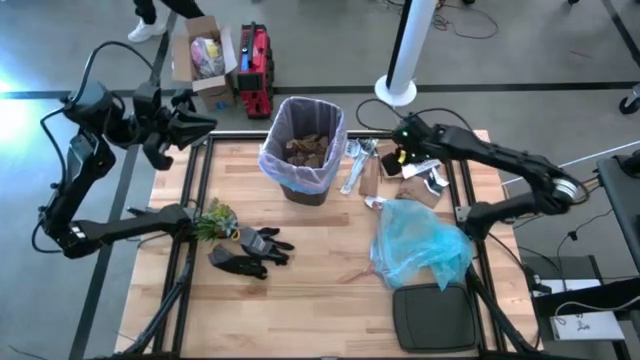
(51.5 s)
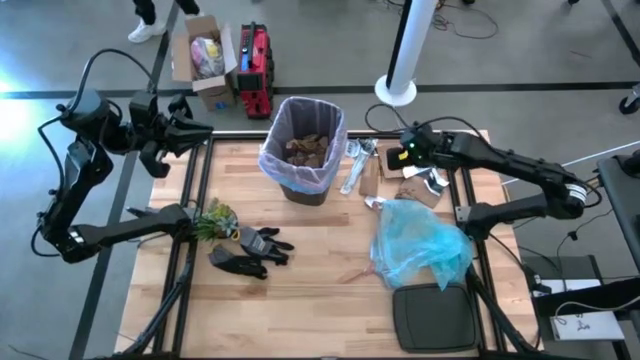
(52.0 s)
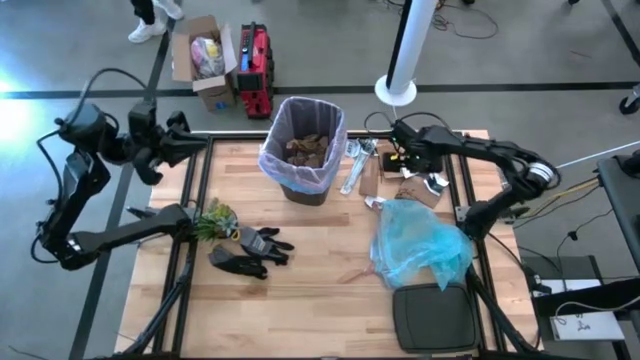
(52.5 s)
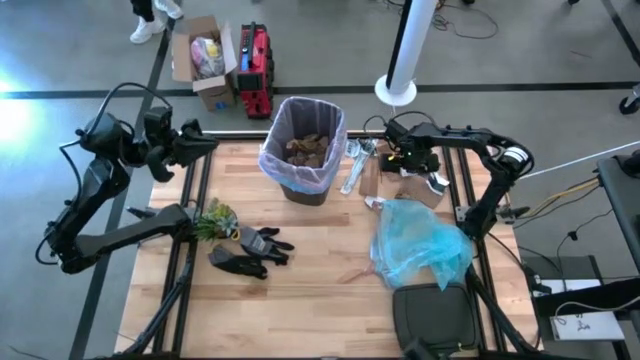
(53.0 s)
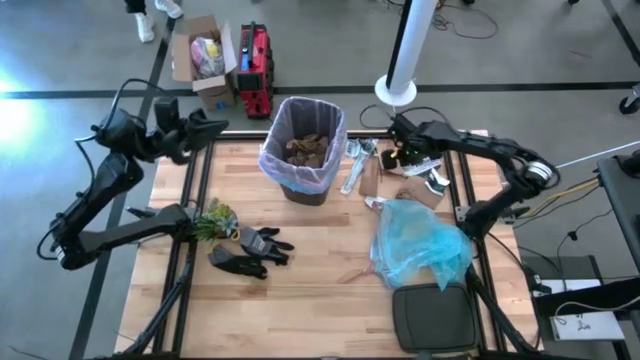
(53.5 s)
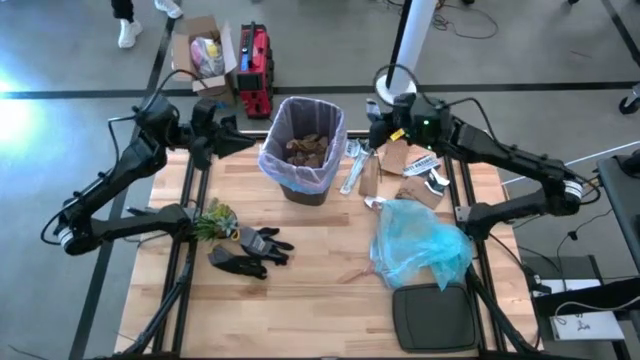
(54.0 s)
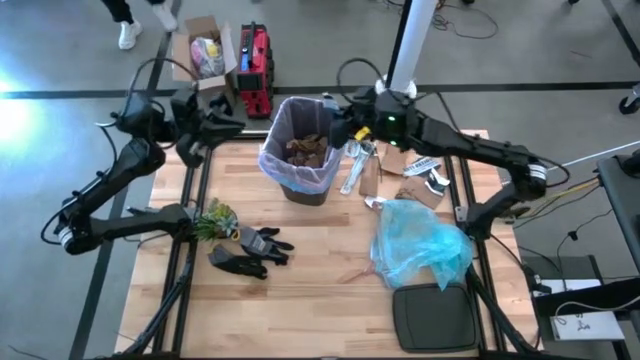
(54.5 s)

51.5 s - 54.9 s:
Task: place trash/remove bag and relplace
Put the white paper into the trash bin

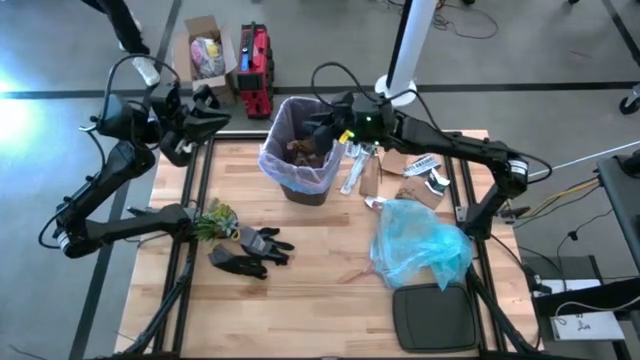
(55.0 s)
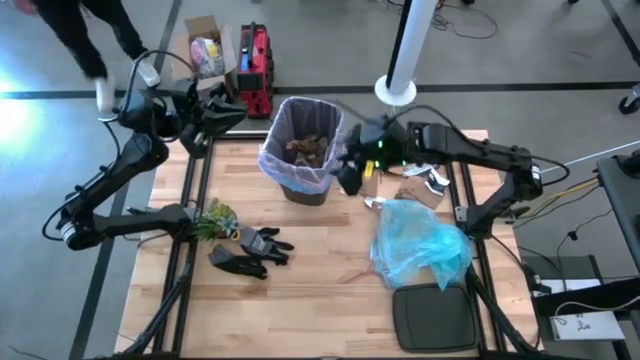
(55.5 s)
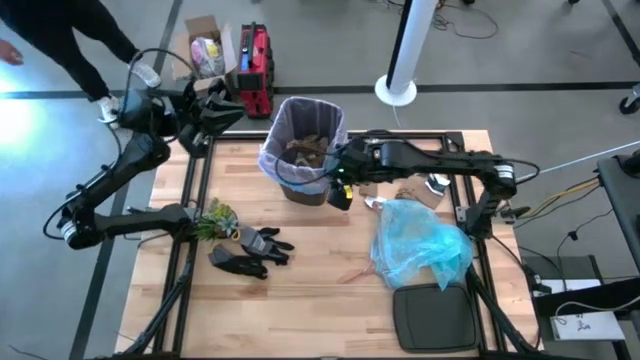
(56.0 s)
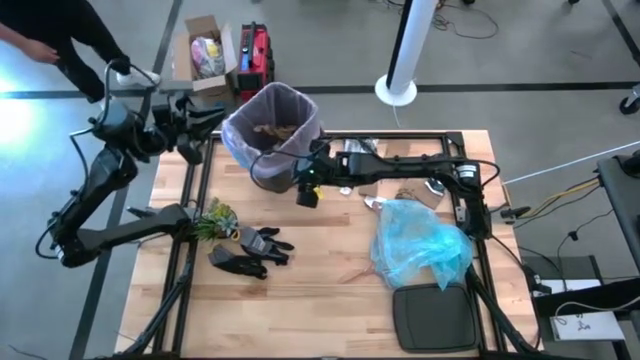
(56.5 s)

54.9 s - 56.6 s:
Adjust the trash bin

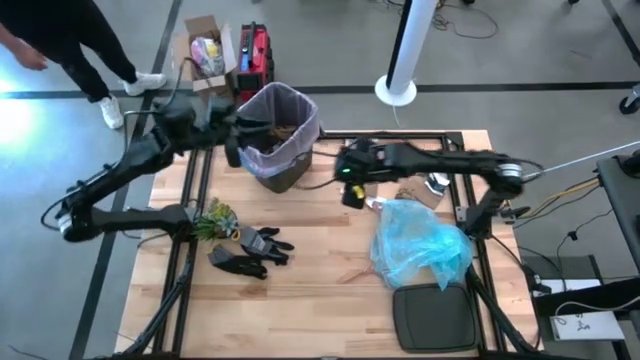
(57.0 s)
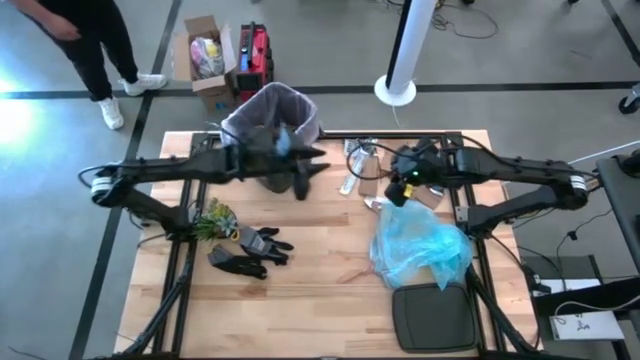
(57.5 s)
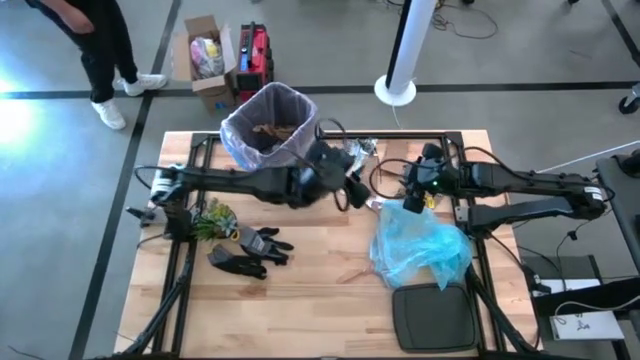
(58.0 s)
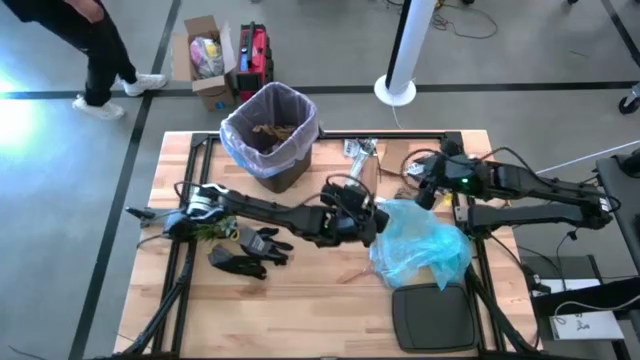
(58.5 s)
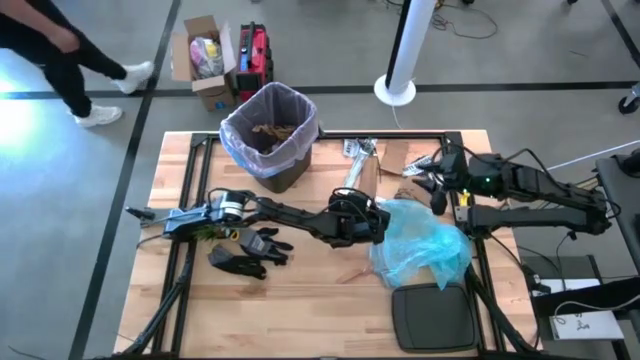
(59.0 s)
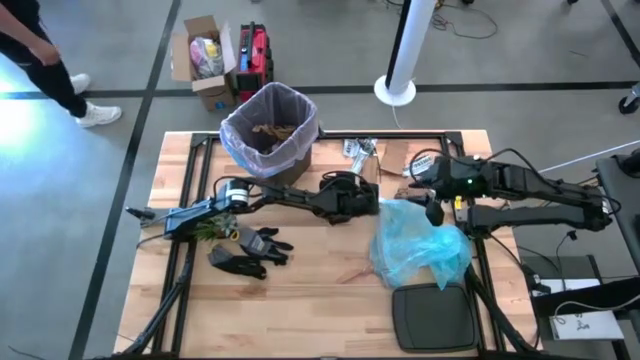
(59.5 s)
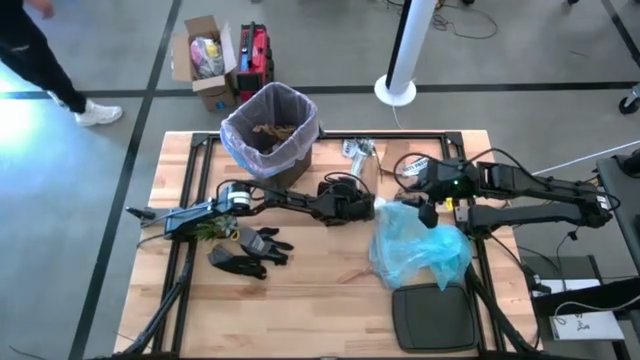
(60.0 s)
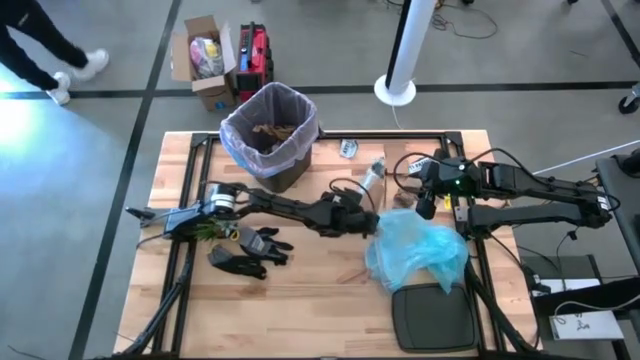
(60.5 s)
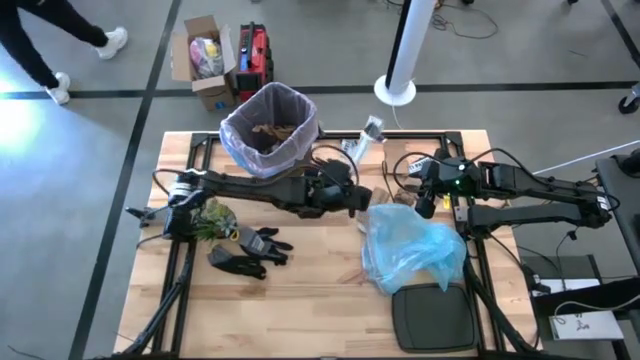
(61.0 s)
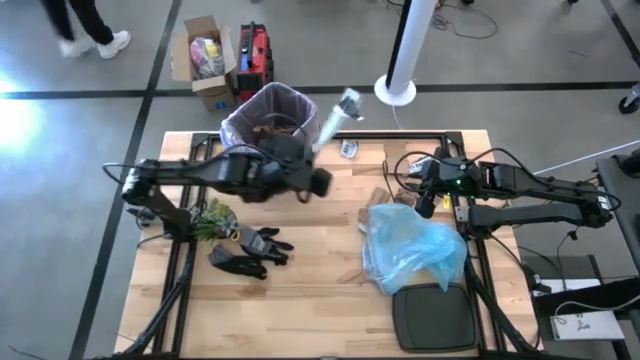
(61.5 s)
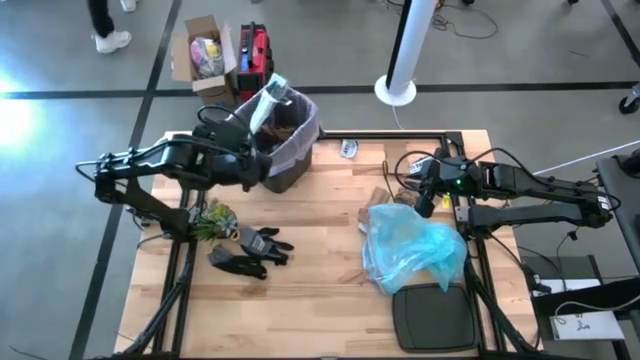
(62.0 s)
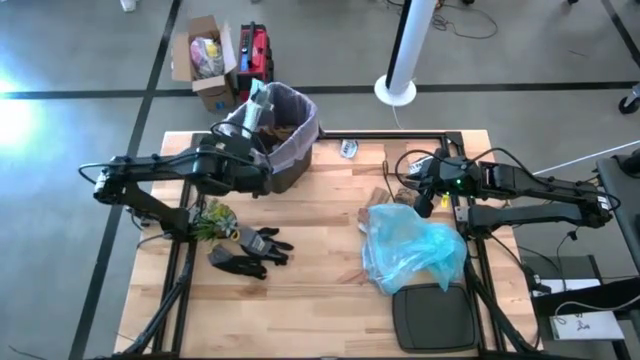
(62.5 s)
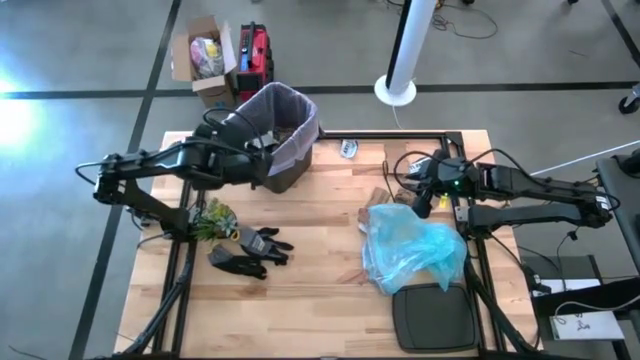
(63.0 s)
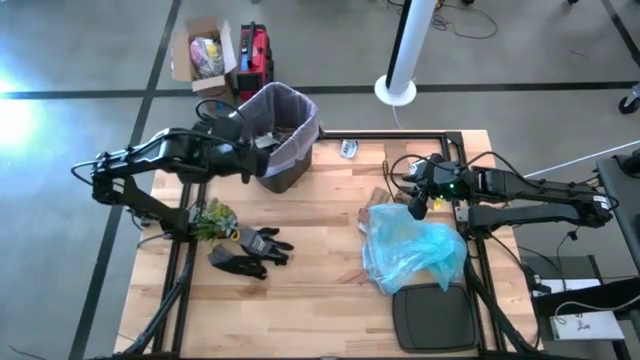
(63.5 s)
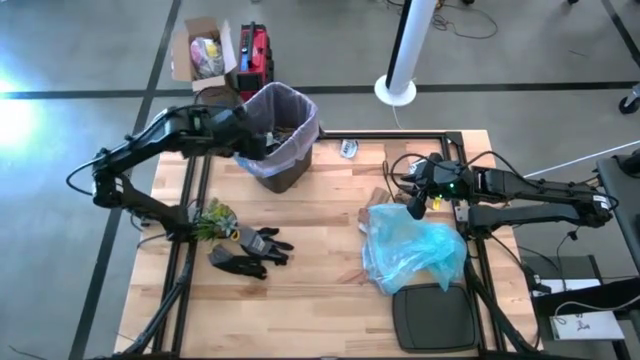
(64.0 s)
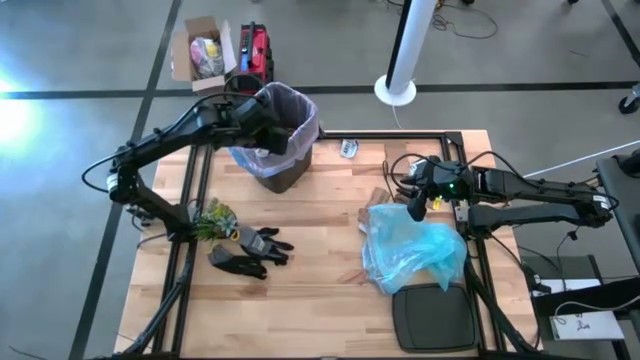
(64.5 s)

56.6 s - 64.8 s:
Put the white plastic into the trash bin

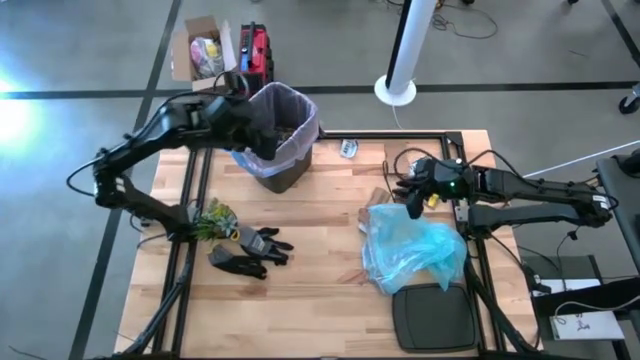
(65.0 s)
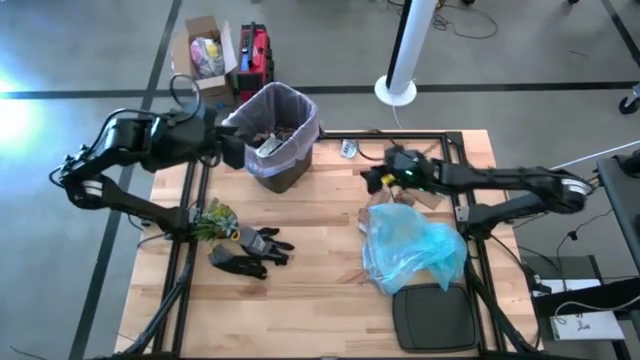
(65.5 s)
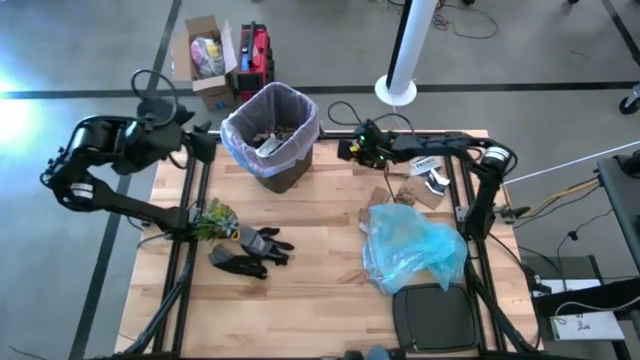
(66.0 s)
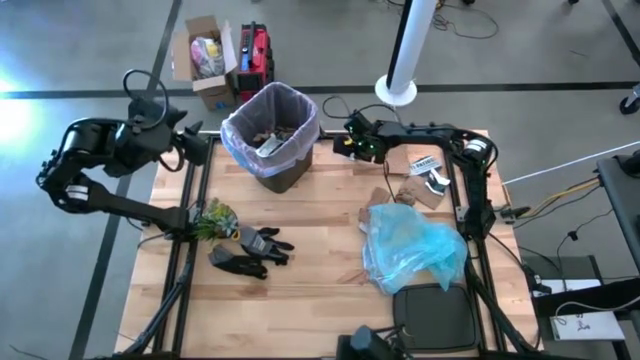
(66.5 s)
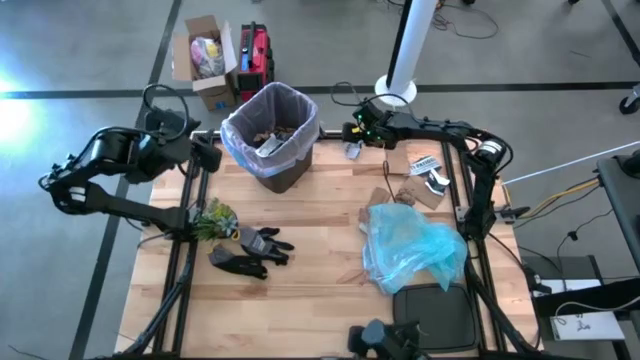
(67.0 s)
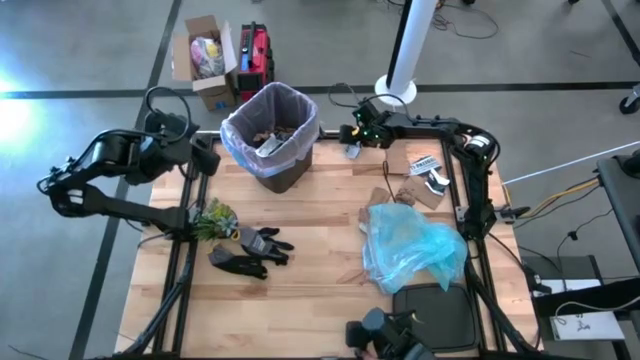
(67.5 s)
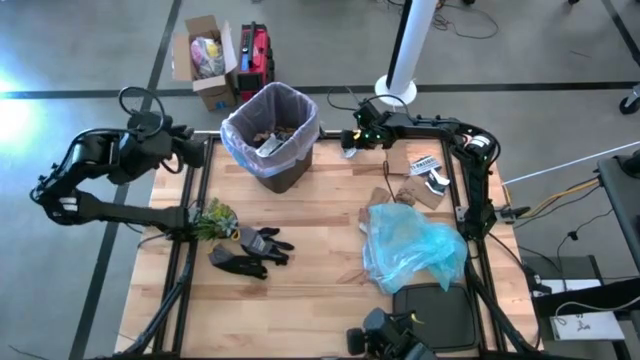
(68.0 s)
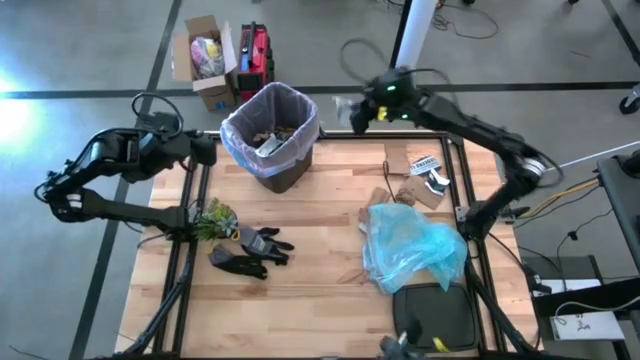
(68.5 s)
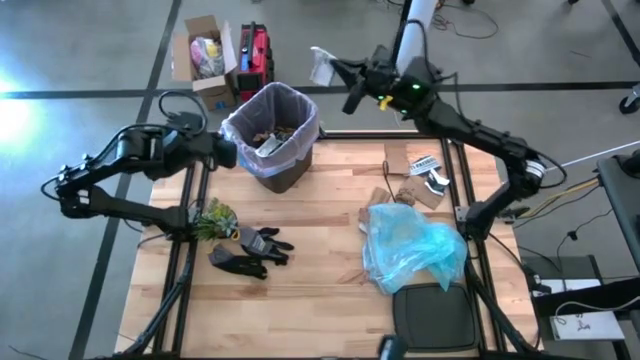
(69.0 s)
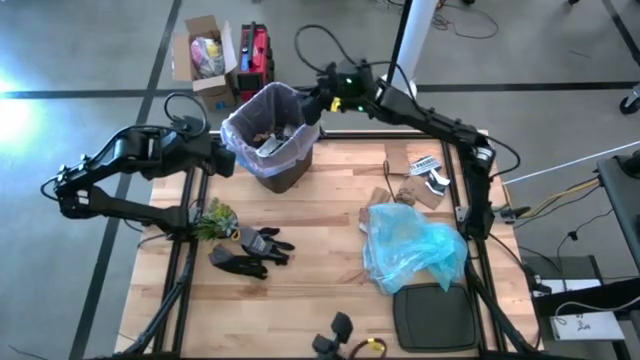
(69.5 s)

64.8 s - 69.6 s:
Put the white paper into the trash bin

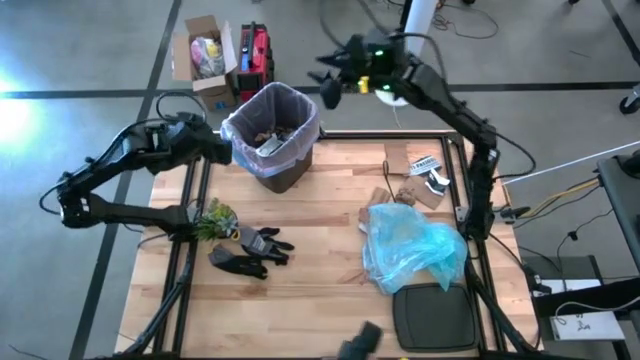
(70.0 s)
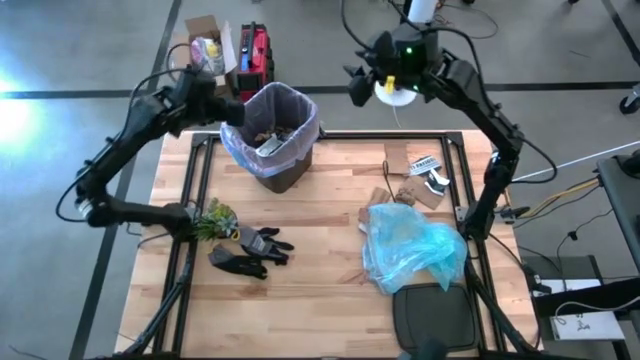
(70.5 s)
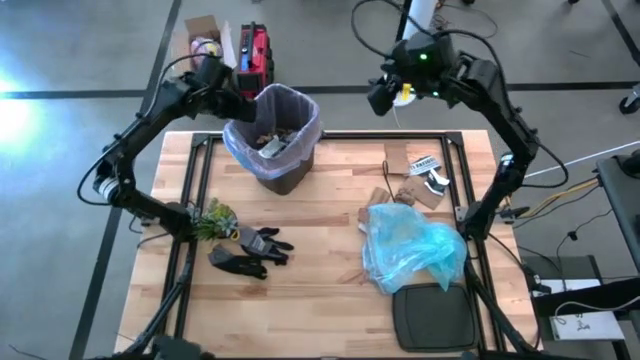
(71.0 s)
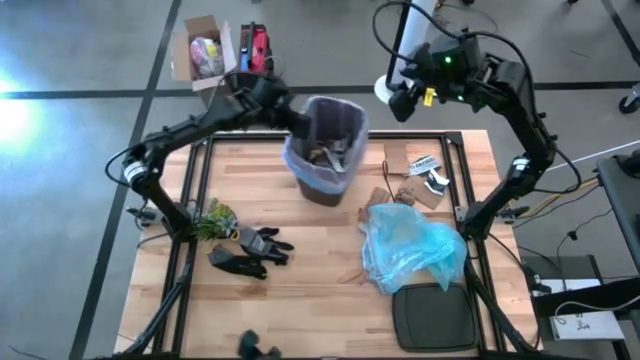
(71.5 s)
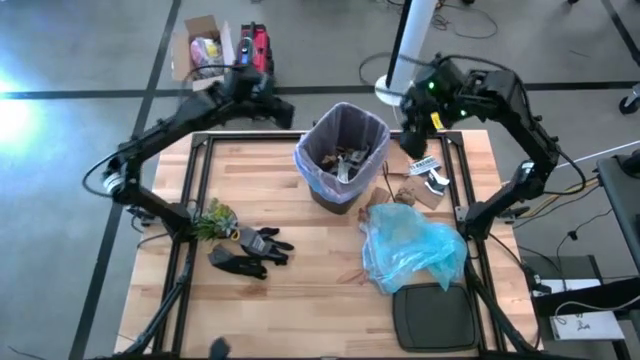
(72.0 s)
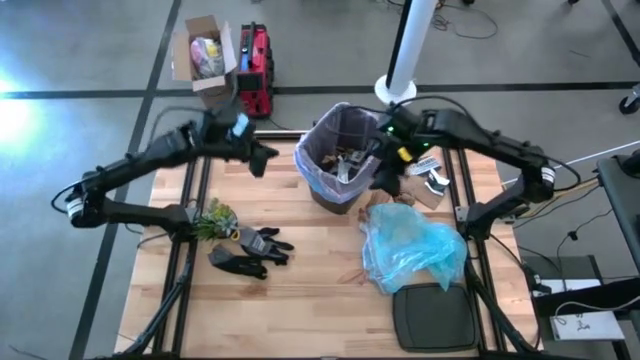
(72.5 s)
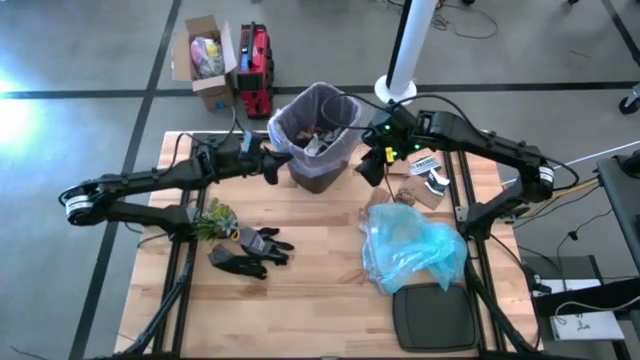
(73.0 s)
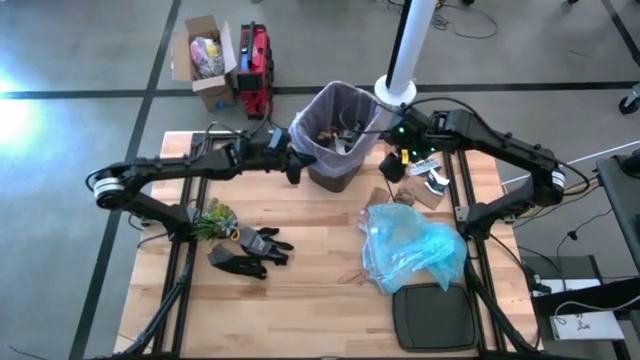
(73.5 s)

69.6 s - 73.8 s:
Adjust the trash bin
